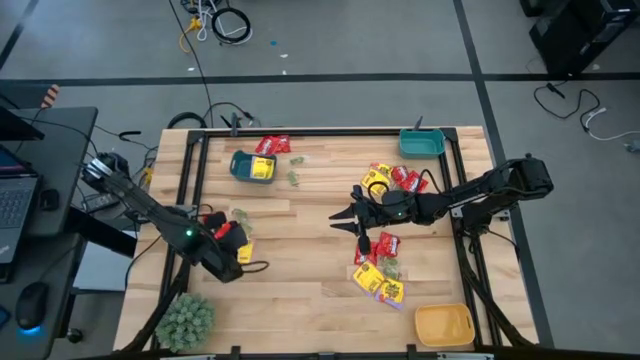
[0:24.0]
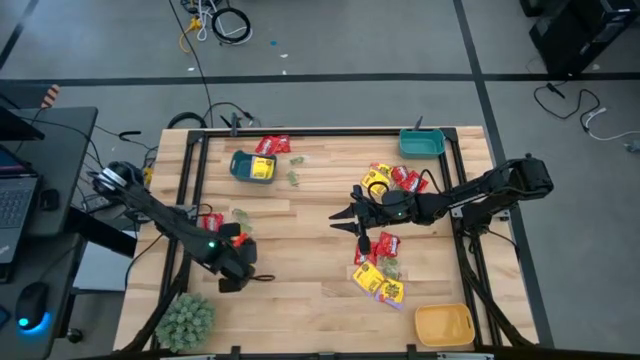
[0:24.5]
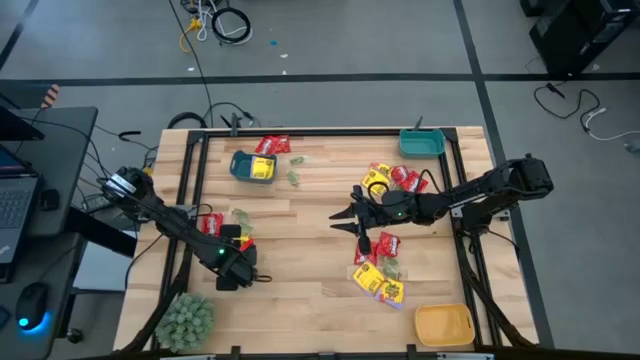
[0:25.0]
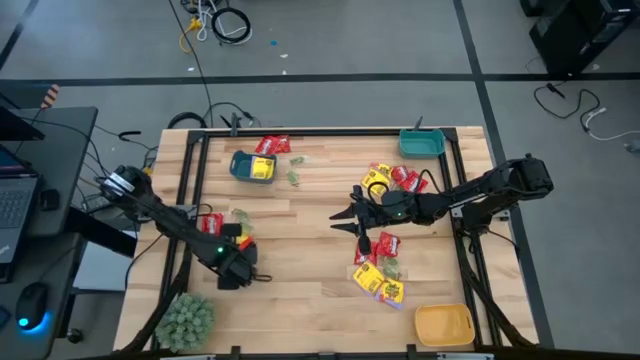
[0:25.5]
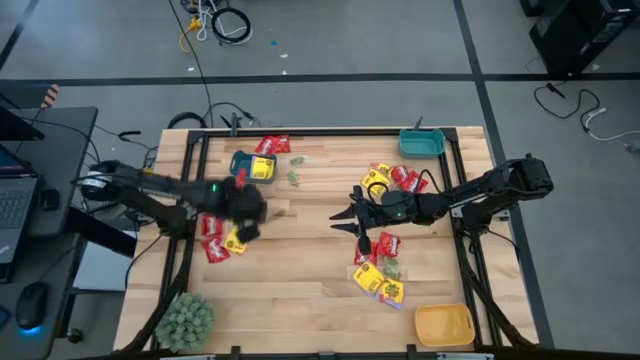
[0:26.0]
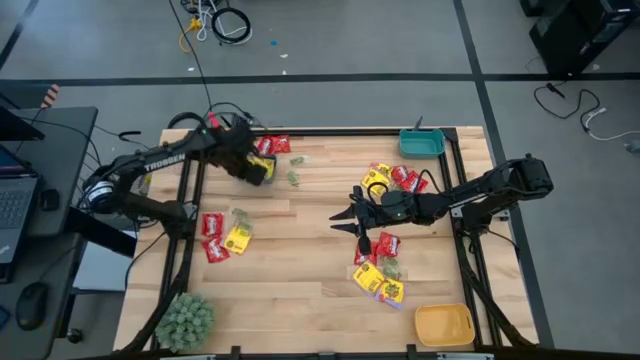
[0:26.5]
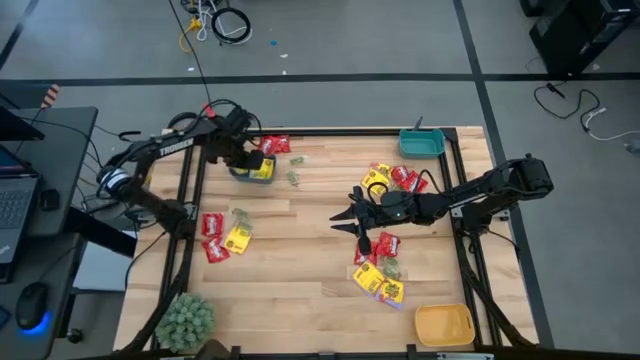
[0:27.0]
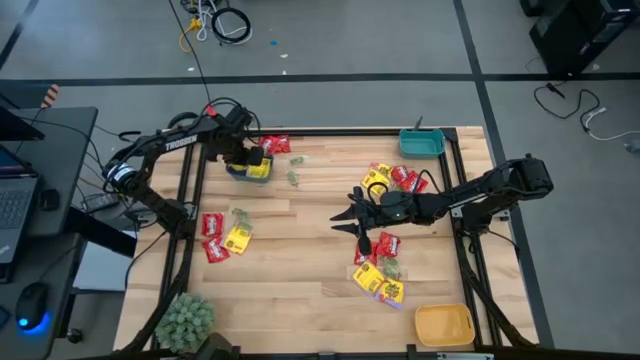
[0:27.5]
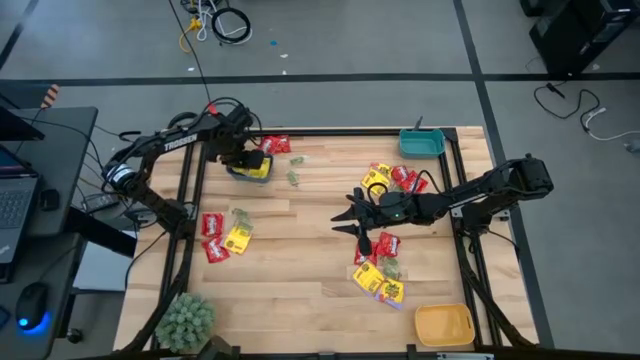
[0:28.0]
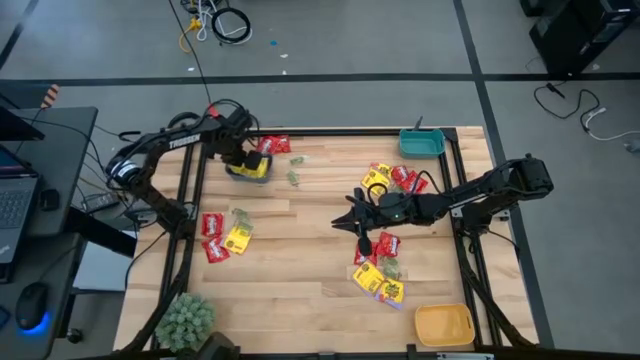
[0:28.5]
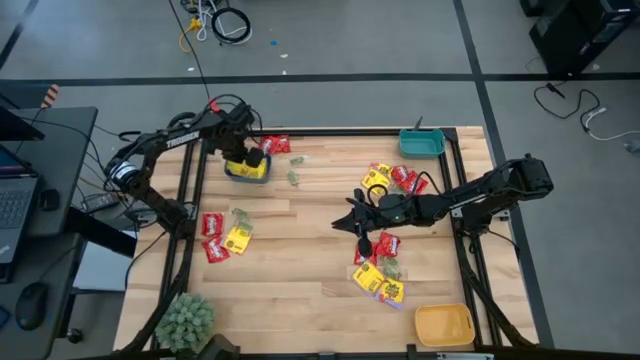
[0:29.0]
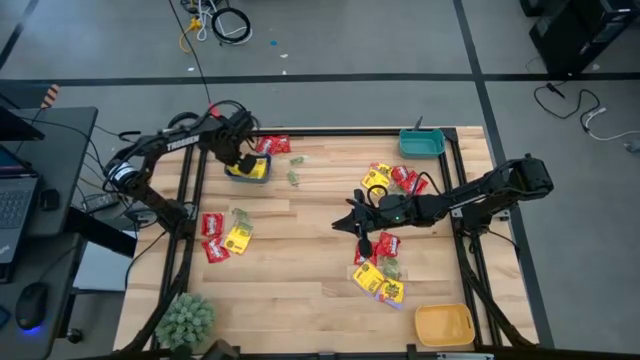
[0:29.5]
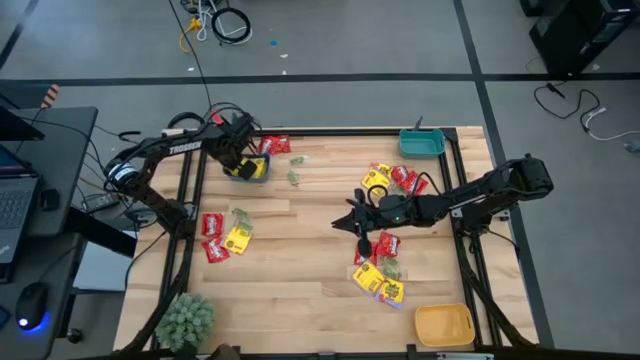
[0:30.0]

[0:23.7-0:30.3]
Task: Sort candy
Put the yellow candy into the dark blue bin

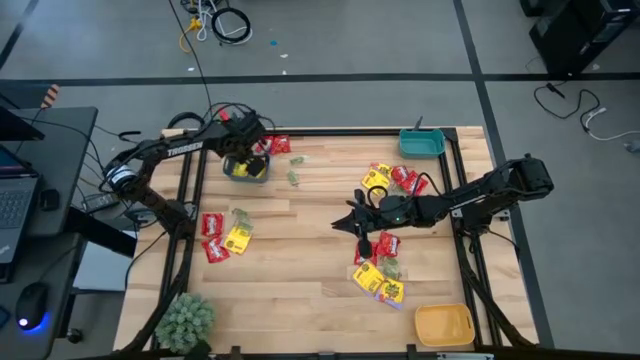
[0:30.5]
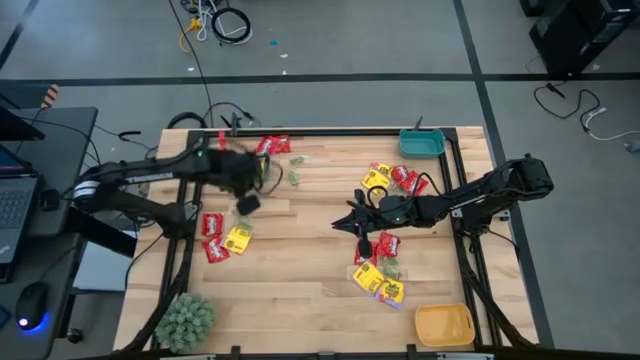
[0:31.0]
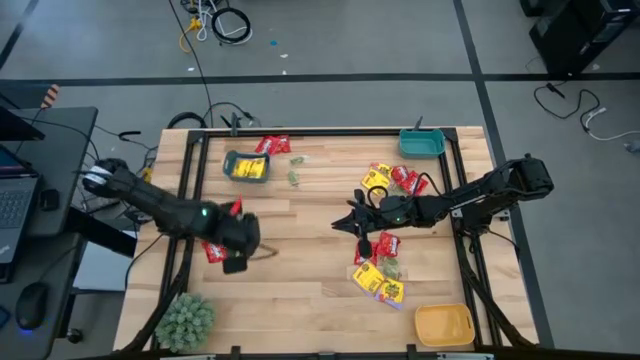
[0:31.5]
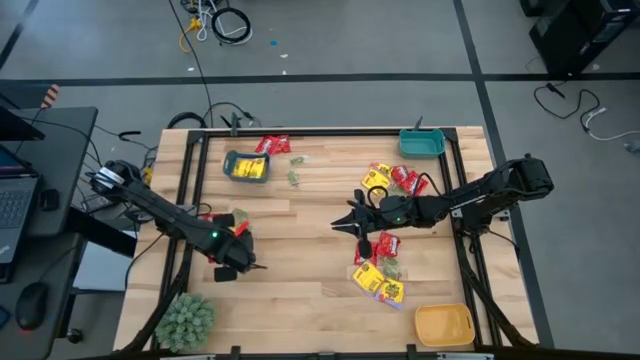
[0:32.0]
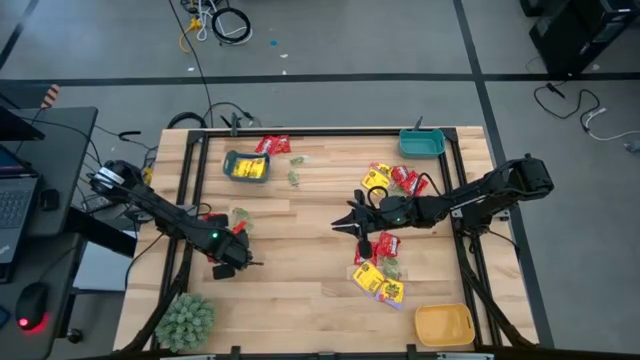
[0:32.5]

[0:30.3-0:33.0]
Put the yellow candy into the dark blue bin

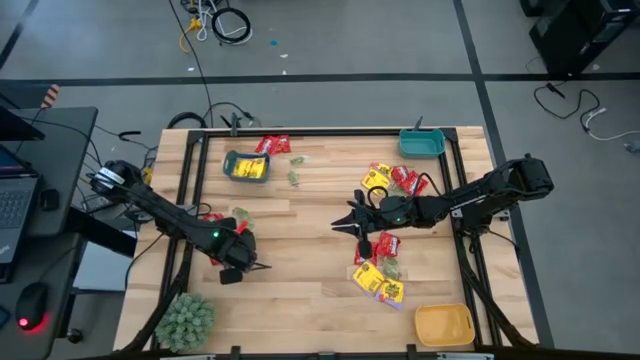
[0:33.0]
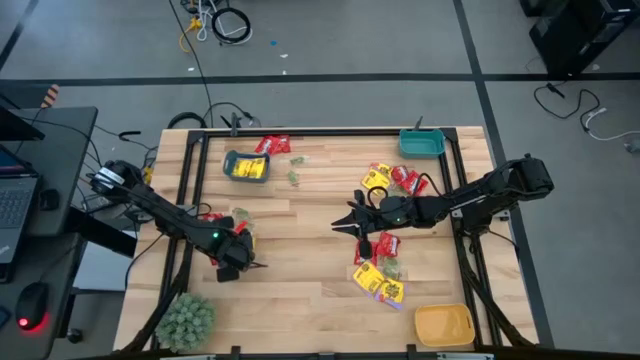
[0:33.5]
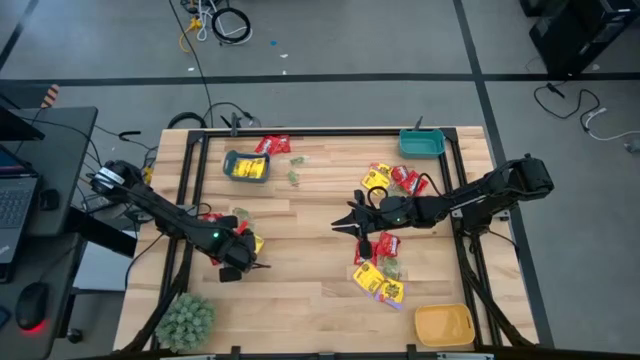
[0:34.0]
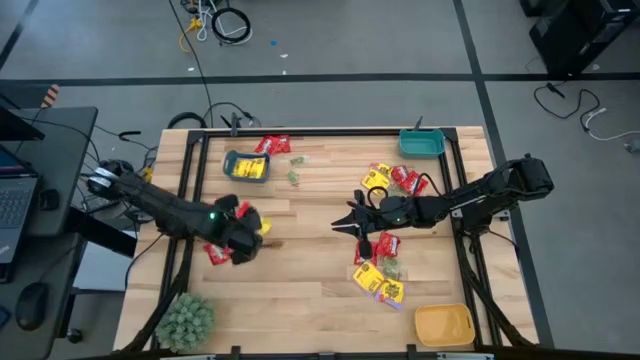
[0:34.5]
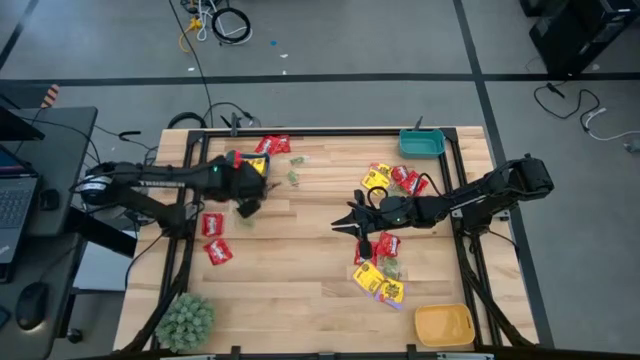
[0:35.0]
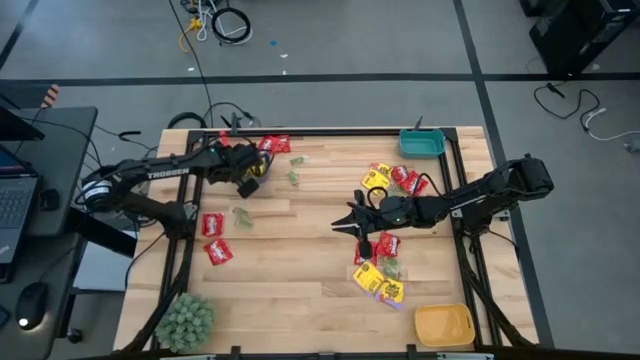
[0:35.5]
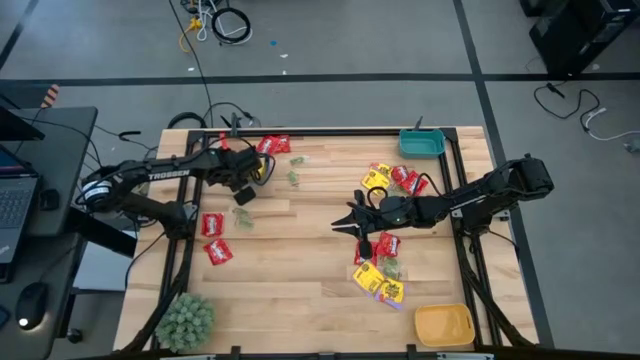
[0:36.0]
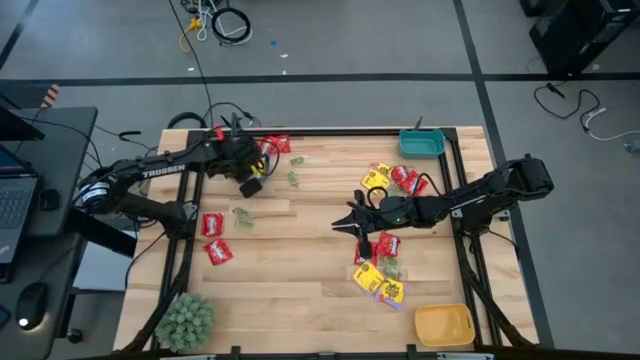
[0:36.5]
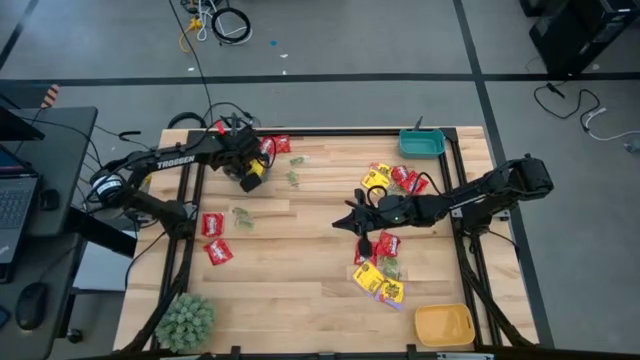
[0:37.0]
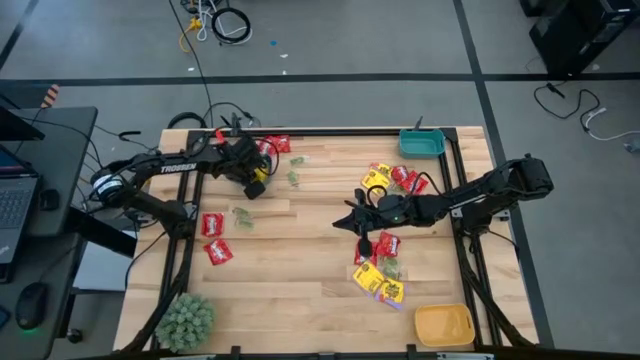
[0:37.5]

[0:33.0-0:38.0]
Put the yellow candy into the dark blue bin

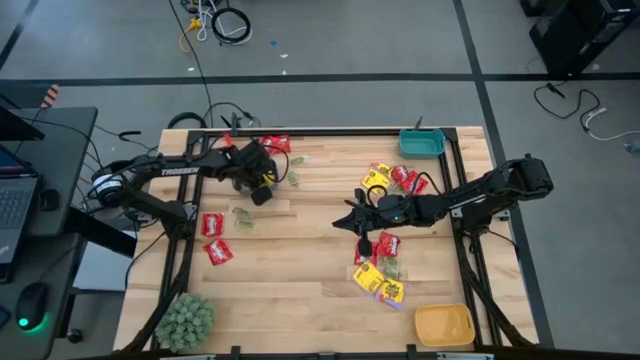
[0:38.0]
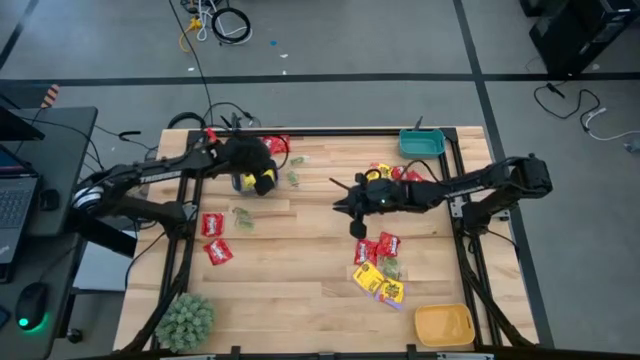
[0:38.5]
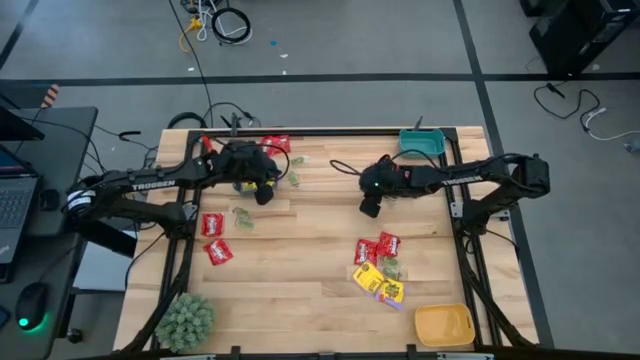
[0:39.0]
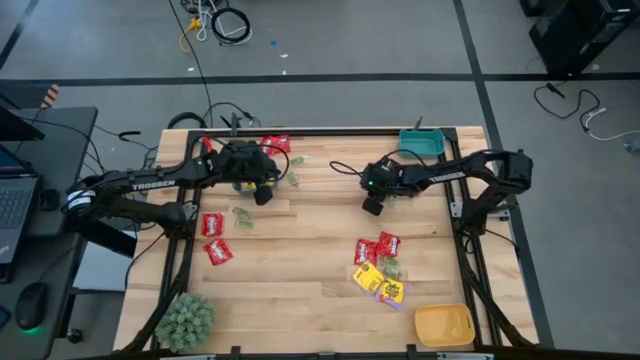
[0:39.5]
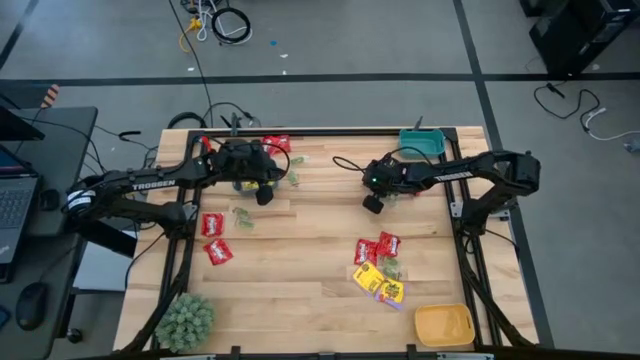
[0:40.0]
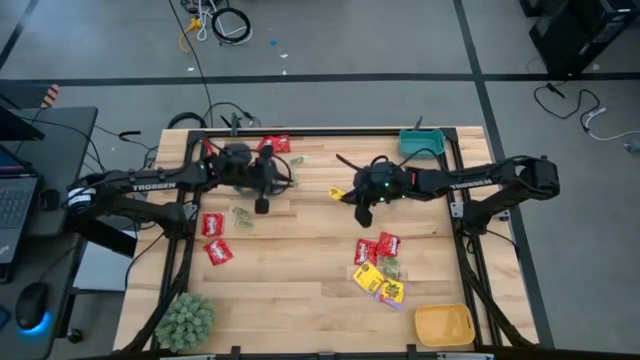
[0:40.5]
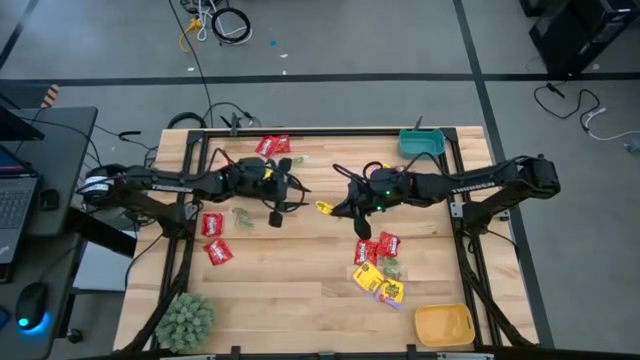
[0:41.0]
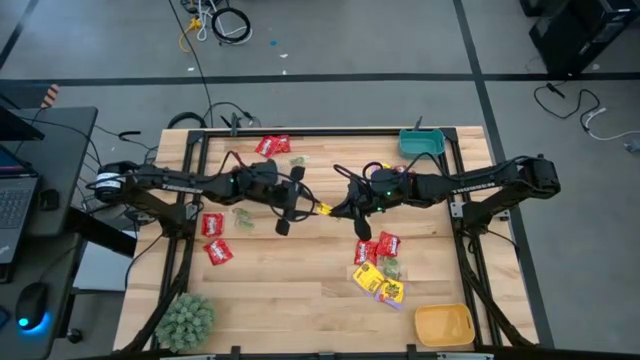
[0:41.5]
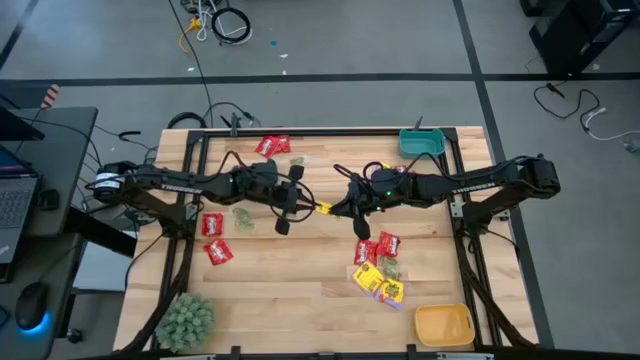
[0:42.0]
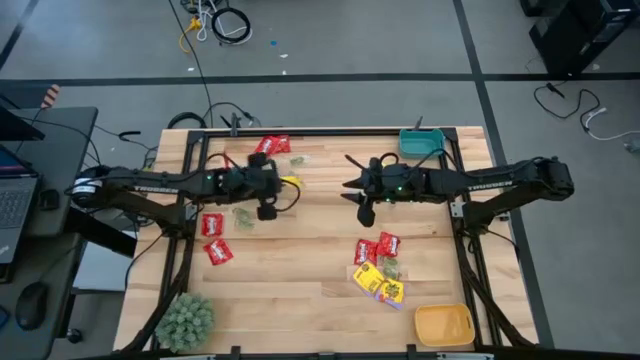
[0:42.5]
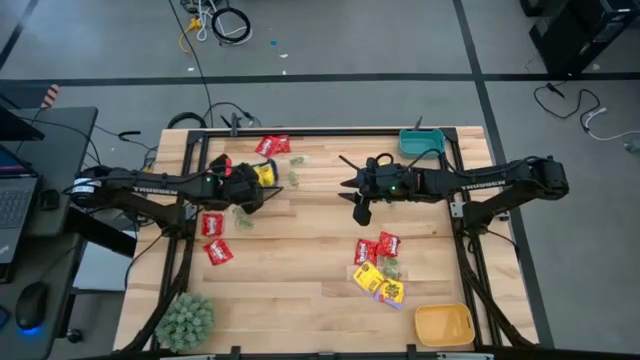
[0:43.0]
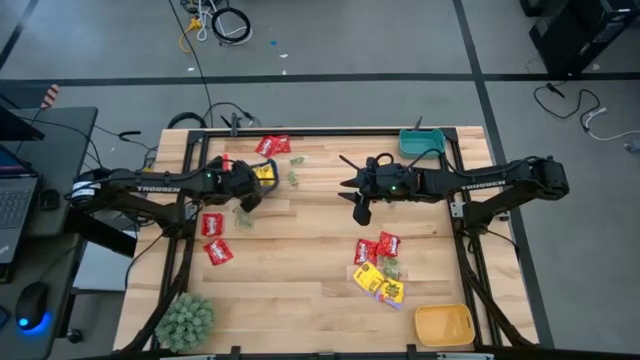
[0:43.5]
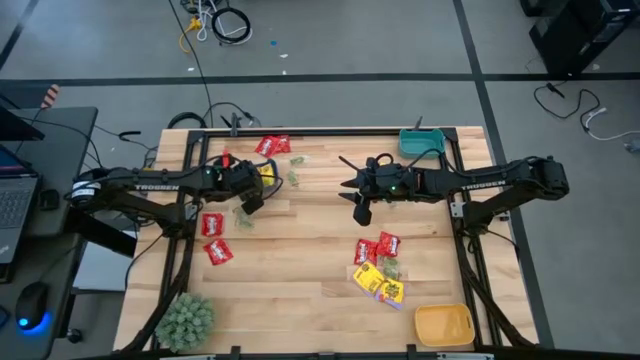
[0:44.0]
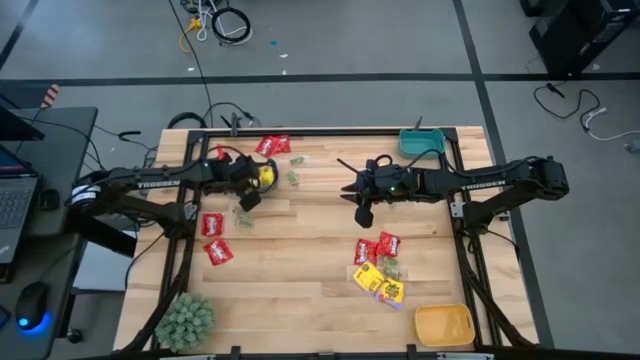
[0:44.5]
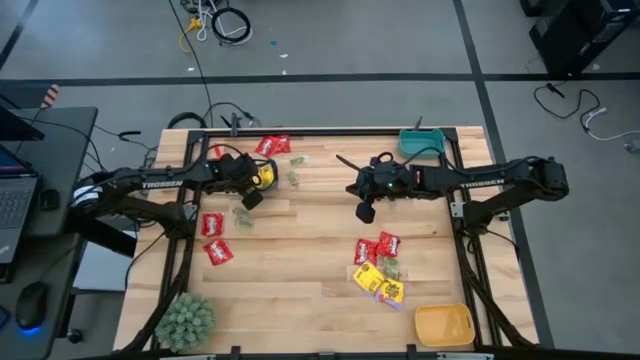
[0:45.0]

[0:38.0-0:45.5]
Put the yellow candy into the dark blue bin
